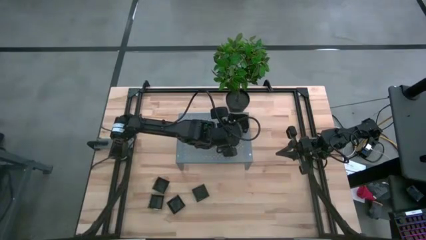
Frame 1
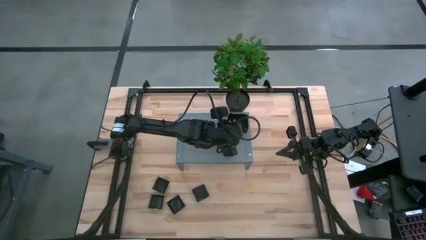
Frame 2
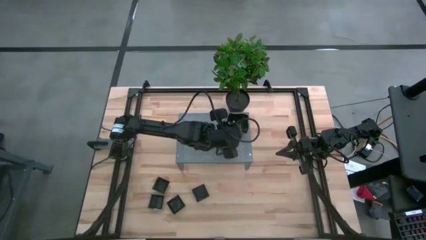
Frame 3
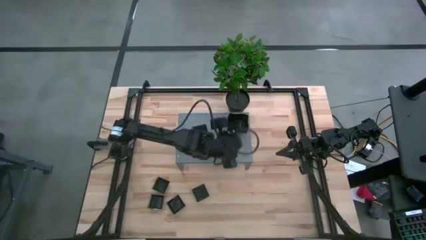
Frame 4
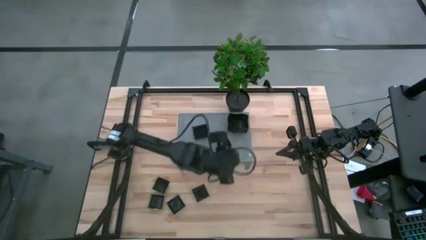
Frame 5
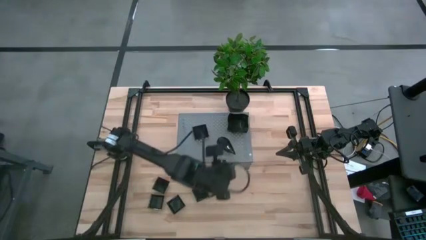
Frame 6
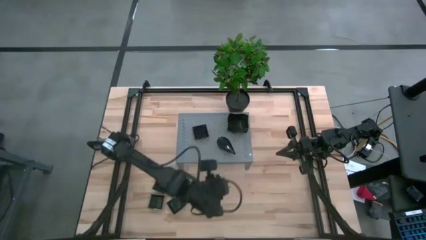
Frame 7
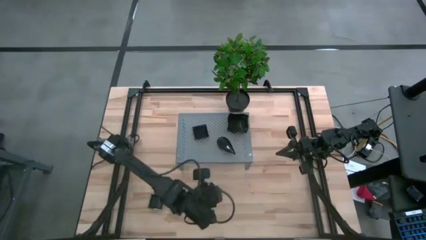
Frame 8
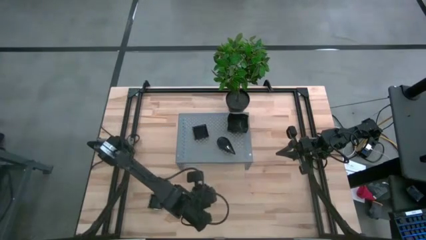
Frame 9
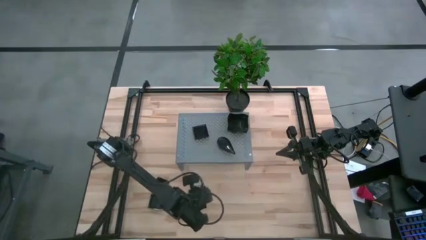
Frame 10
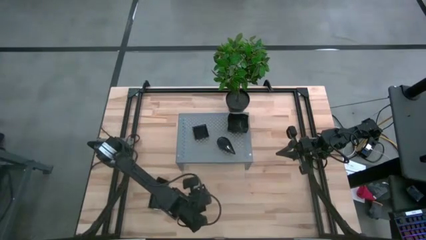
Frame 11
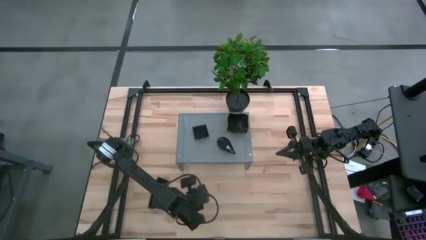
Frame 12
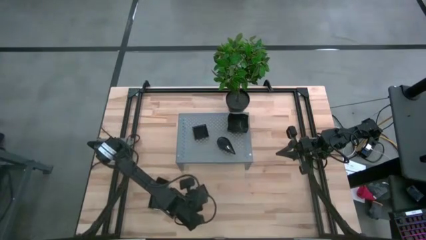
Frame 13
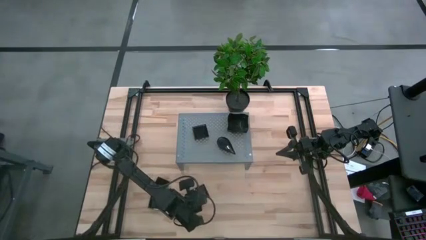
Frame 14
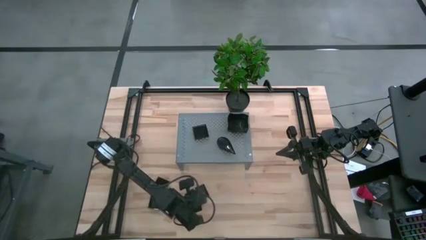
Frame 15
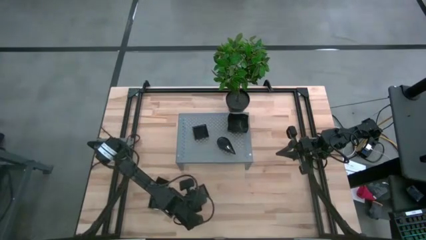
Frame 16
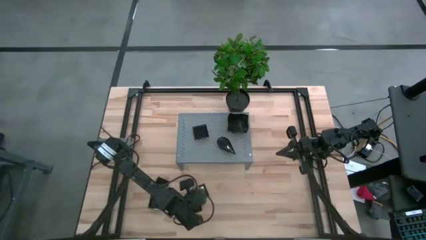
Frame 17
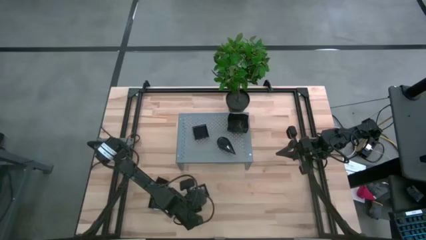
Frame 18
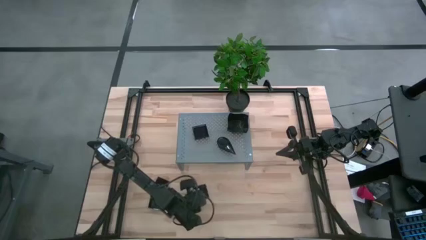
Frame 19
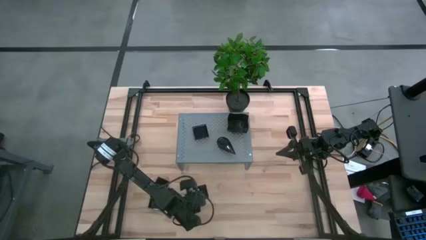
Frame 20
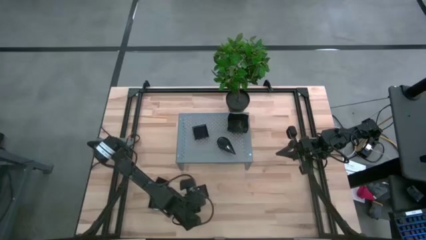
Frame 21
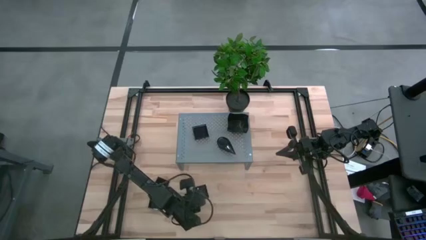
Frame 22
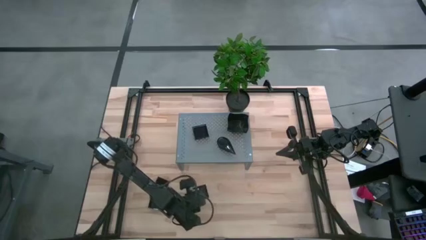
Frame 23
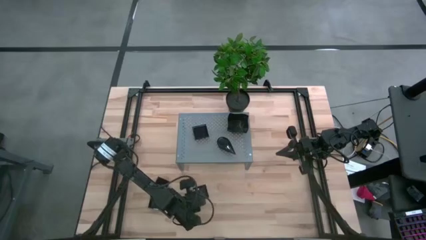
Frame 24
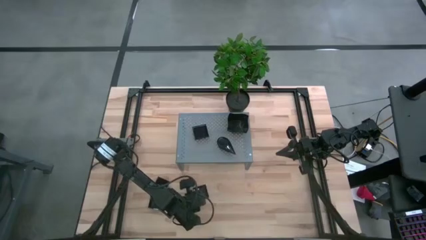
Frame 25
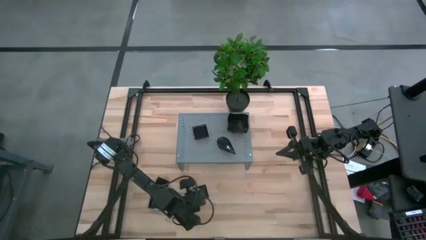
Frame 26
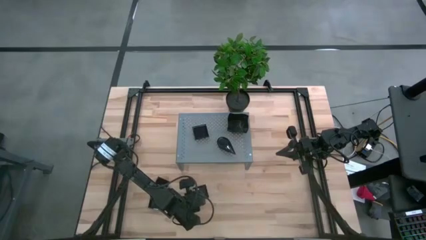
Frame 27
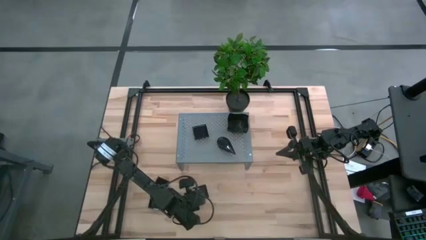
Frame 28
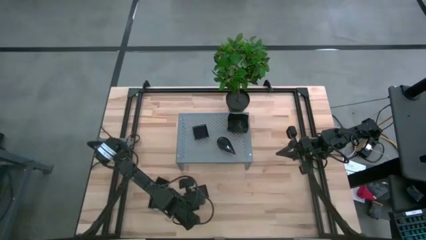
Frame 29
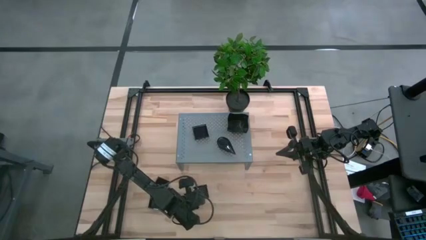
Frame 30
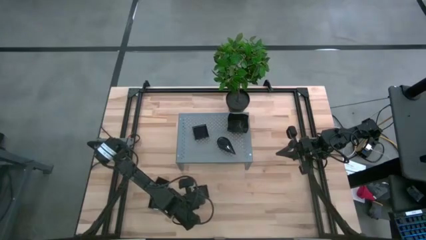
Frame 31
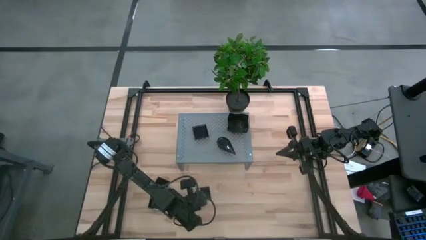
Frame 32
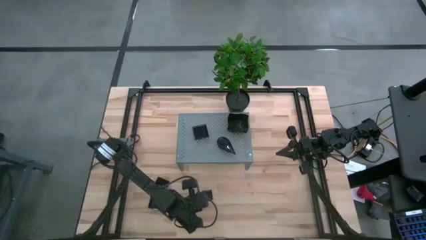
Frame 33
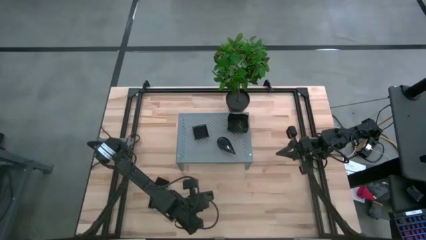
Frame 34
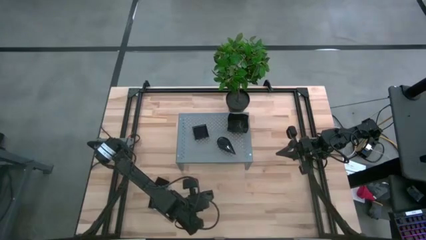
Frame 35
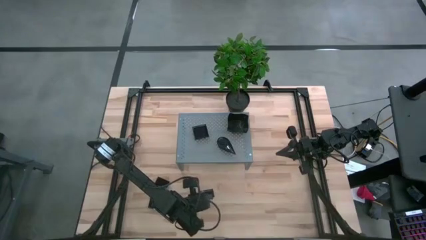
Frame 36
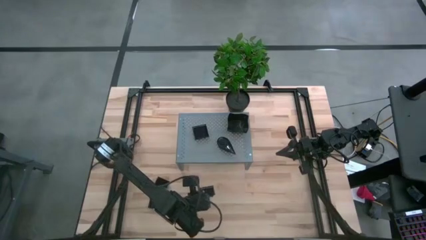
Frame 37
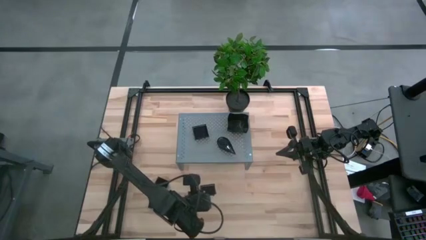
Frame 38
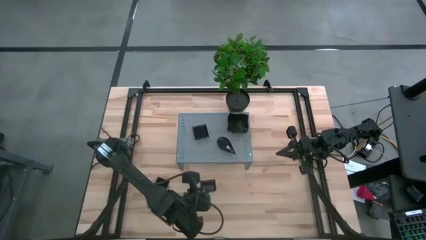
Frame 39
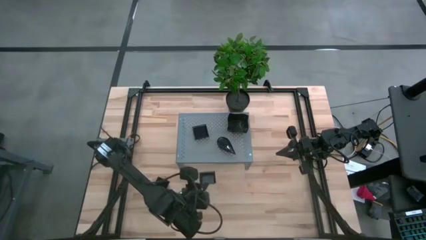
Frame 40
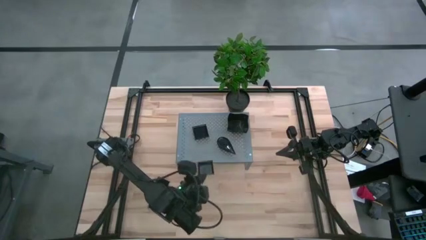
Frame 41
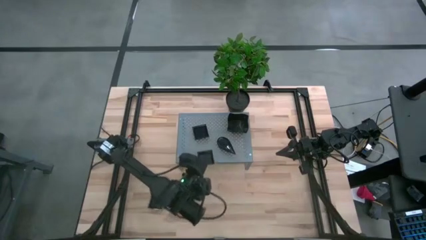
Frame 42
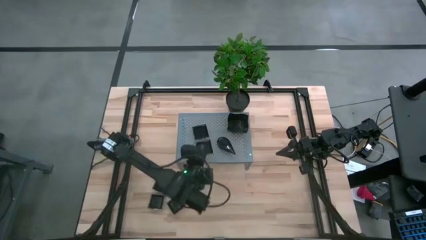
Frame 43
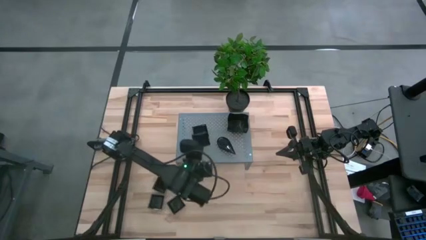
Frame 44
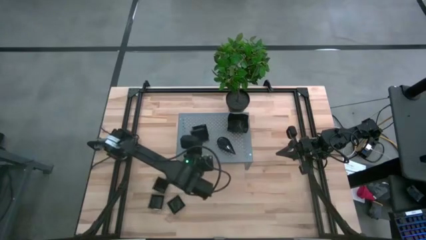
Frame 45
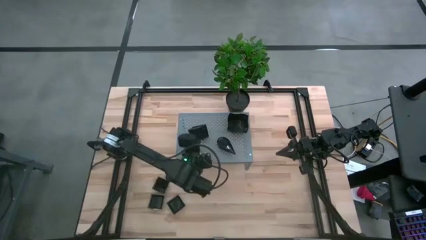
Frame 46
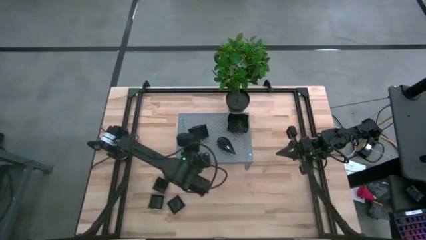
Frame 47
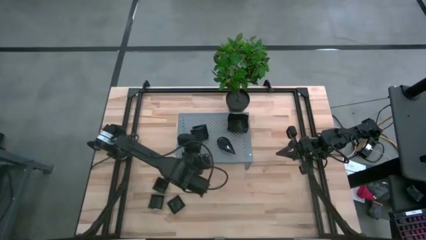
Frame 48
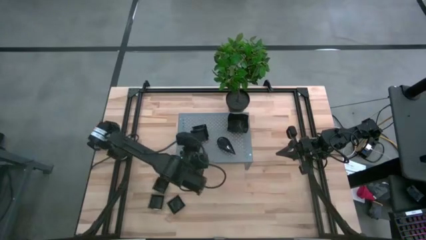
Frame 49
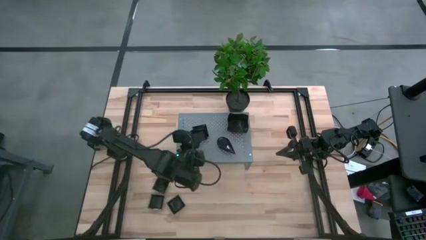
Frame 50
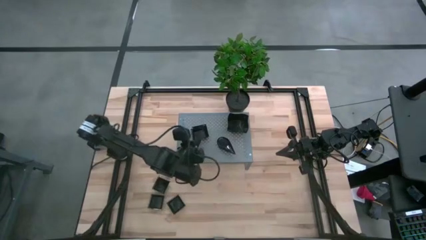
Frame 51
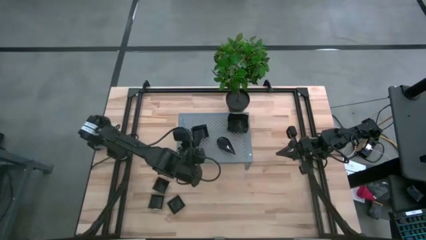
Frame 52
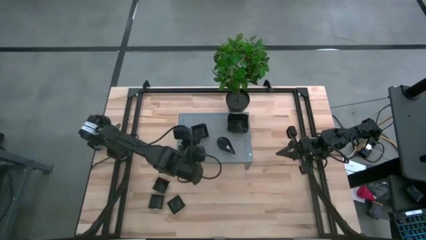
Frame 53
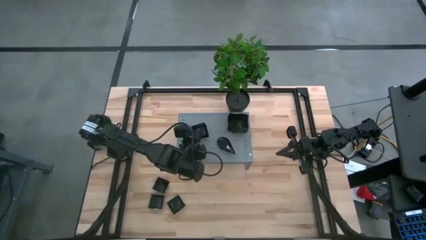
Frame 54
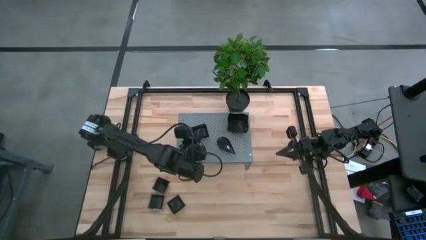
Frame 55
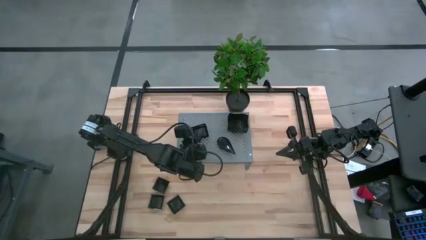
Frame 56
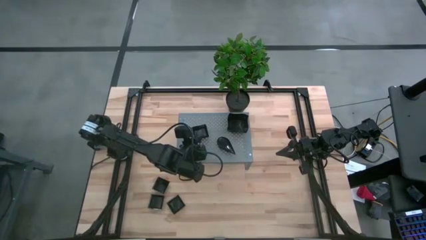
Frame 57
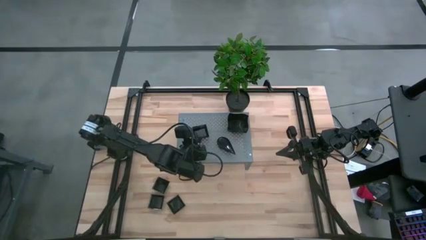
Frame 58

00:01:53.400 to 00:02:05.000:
Task: Pick & Place Mini shaped plates
Stack the black square plate on the black square plate on the shelf
